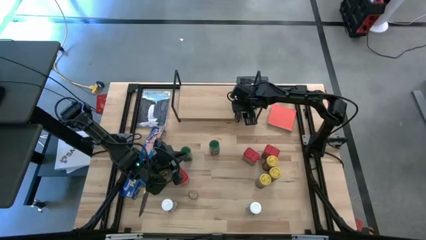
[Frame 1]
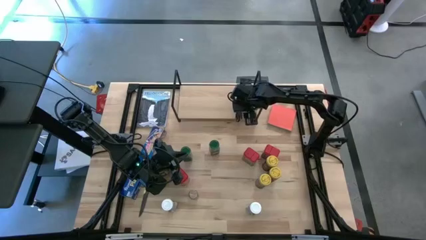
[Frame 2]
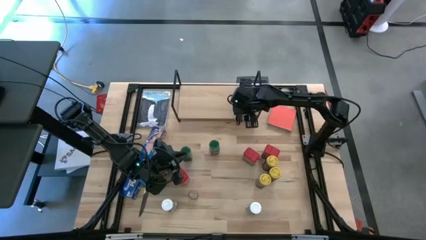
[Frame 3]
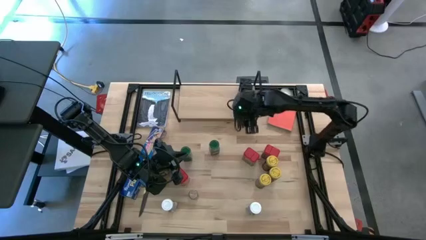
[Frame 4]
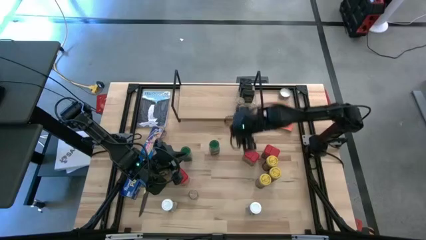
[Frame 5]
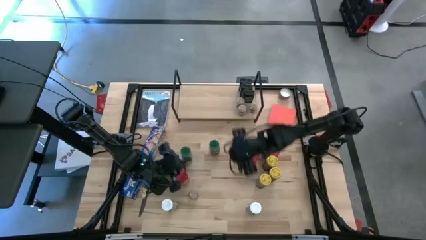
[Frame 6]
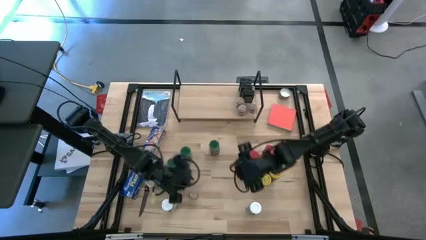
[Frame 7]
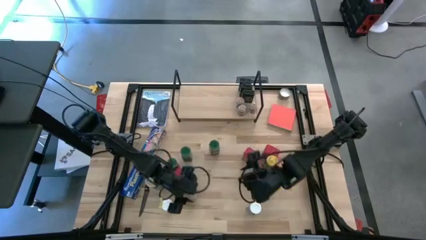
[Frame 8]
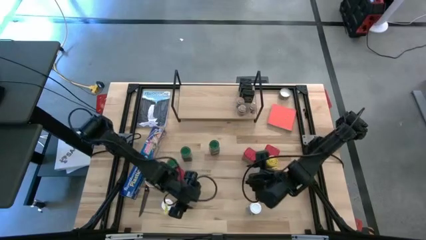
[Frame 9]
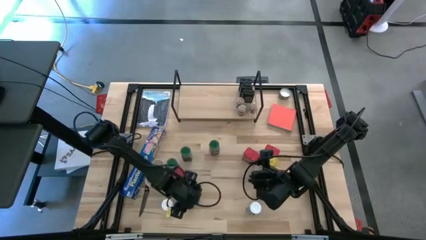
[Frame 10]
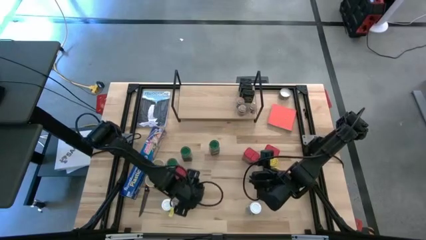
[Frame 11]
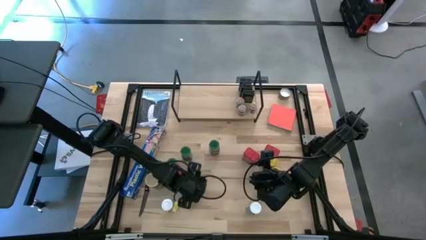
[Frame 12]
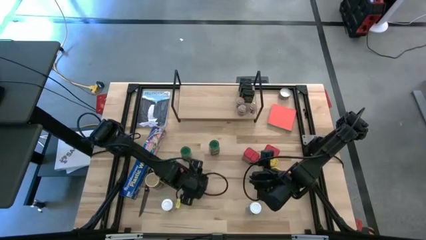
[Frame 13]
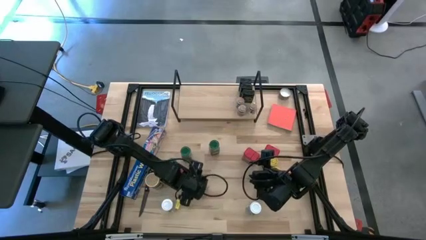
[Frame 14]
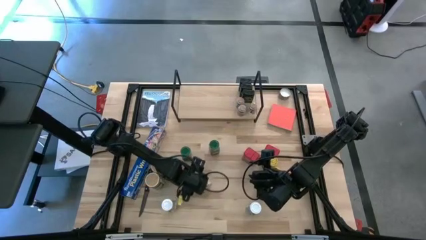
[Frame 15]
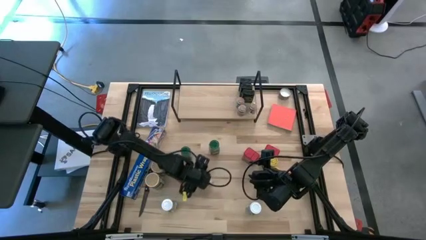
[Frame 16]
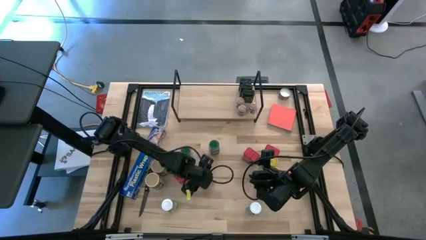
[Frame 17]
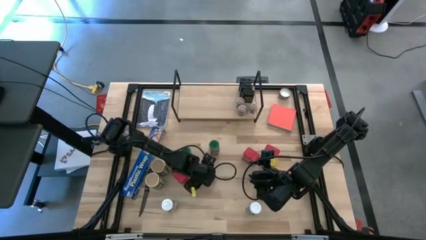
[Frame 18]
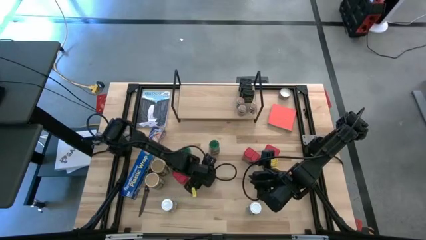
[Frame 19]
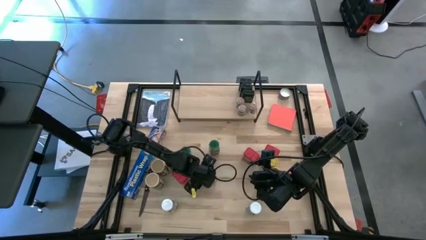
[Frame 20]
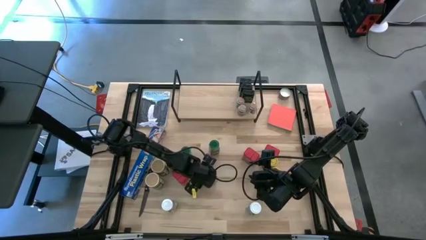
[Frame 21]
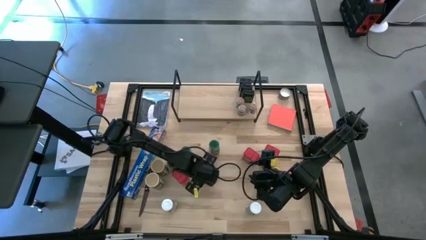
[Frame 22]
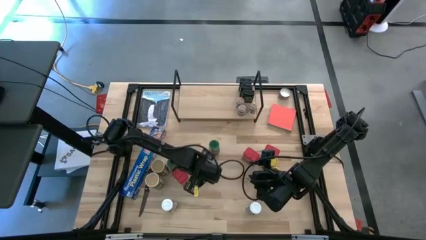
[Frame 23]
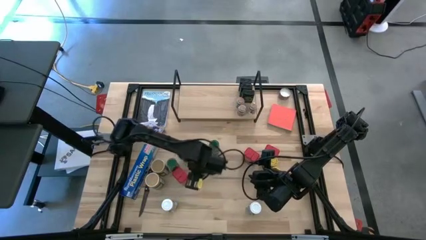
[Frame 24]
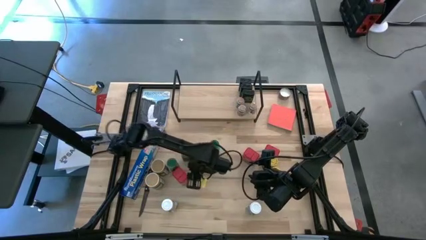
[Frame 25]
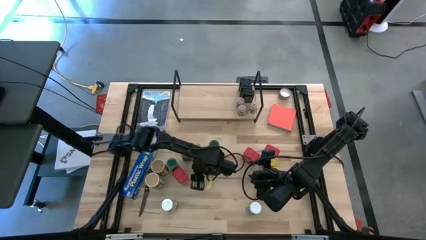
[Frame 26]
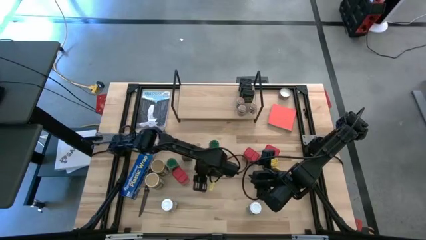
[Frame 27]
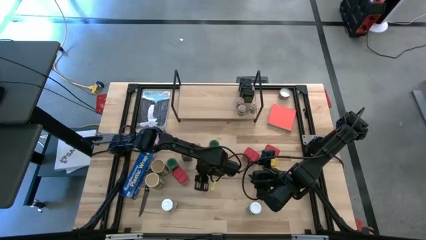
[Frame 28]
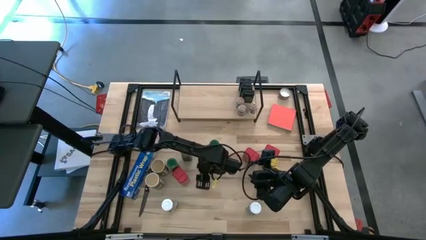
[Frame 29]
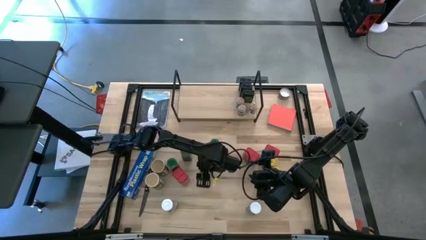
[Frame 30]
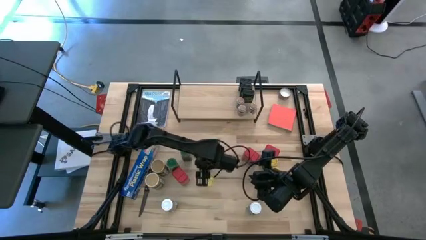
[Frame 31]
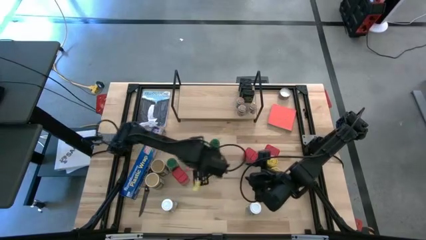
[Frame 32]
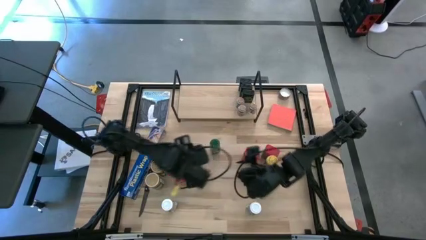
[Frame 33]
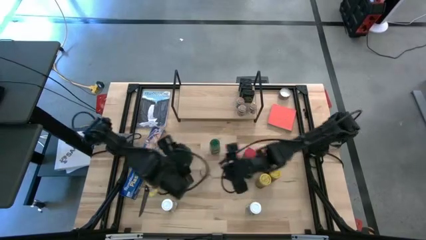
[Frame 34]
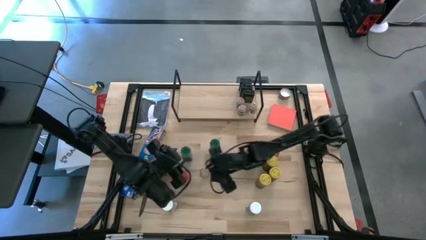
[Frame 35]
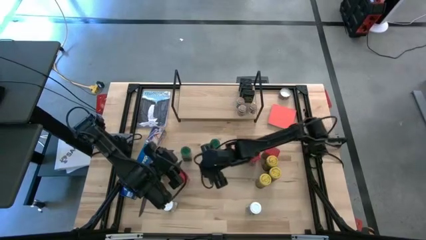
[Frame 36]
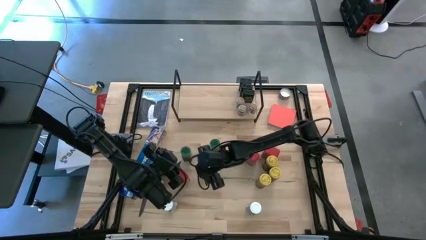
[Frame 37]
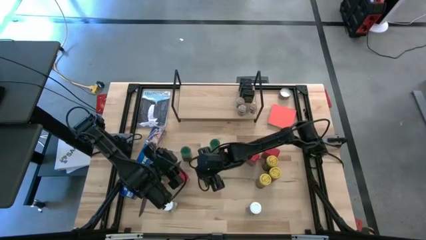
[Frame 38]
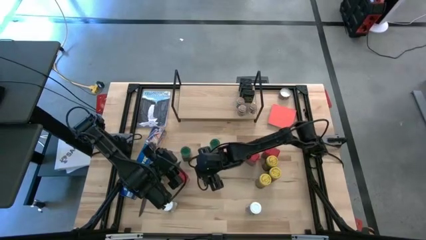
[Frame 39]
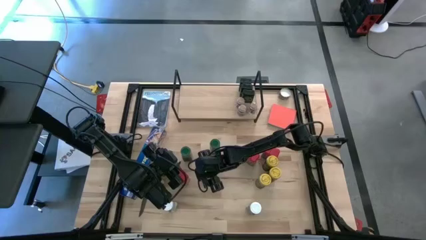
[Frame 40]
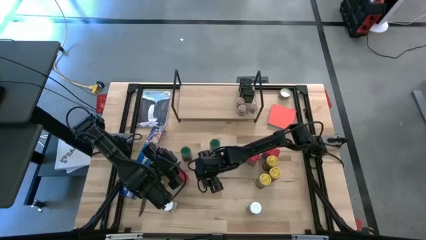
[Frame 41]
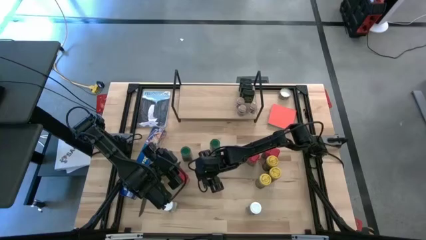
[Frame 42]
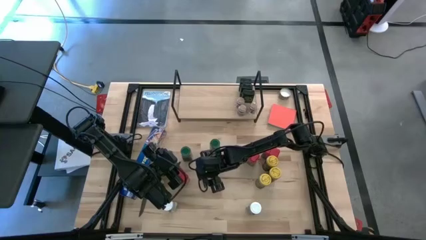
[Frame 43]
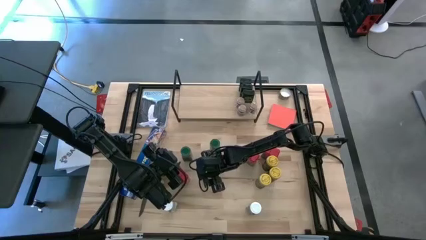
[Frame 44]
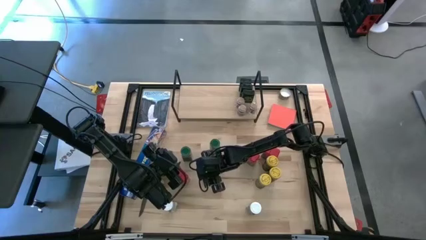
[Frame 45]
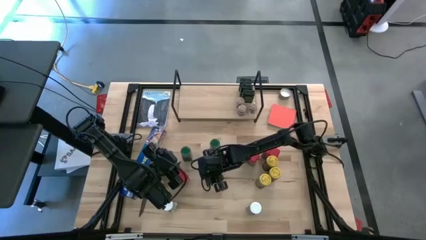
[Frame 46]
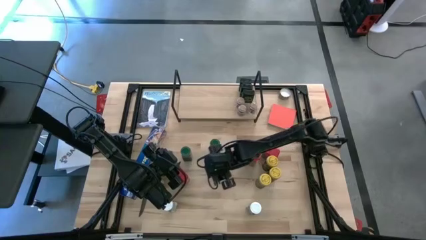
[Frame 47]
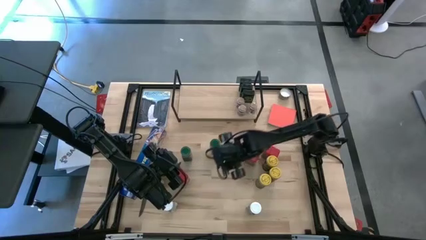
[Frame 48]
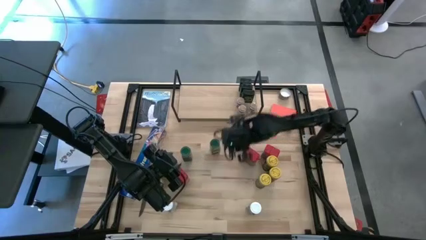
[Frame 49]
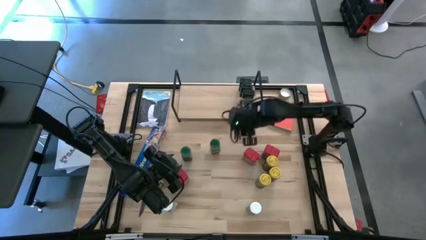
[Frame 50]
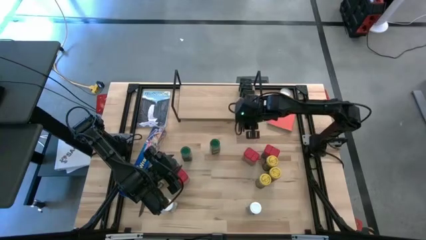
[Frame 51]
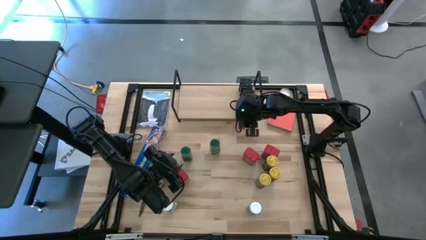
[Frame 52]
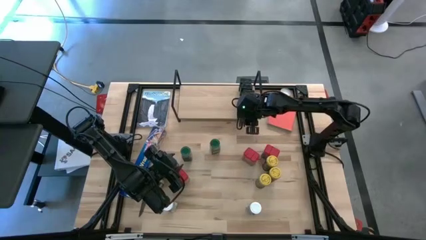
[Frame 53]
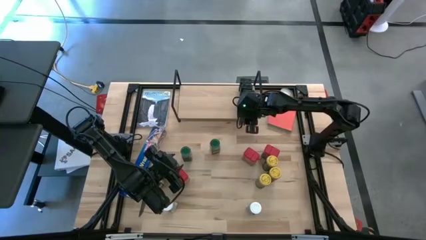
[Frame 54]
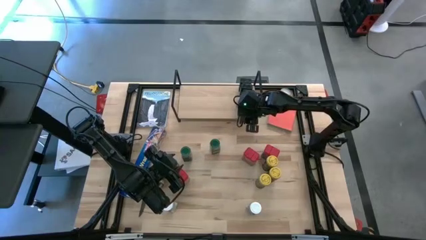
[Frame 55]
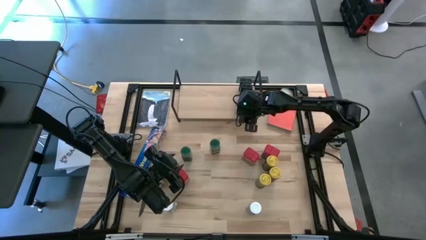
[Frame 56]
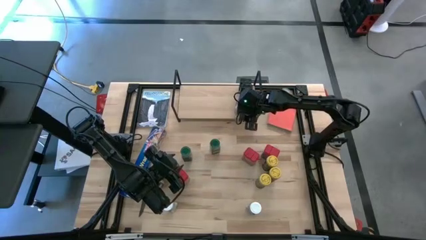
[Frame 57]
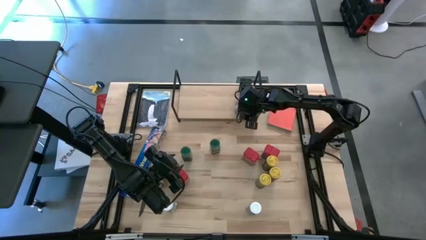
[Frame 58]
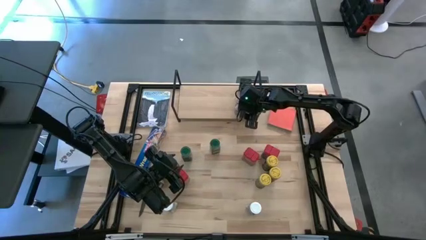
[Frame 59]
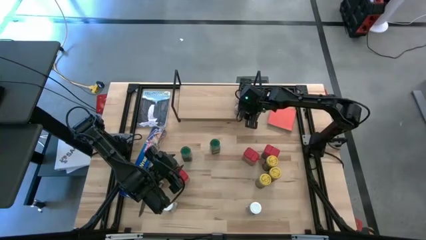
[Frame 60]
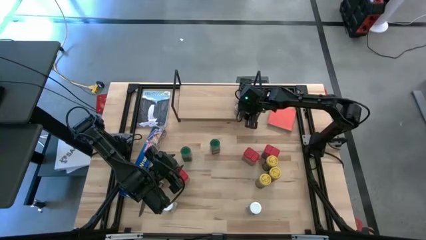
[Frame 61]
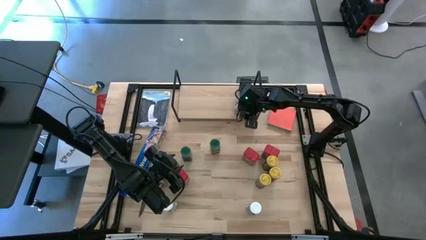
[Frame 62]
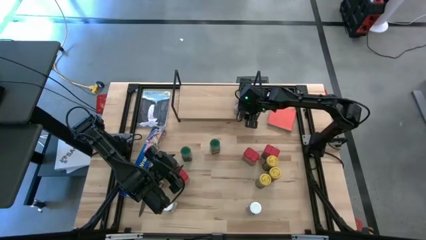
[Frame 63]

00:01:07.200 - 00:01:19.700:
Task: Shelf spices
Put the transparent seasoning bottle on the shelf
